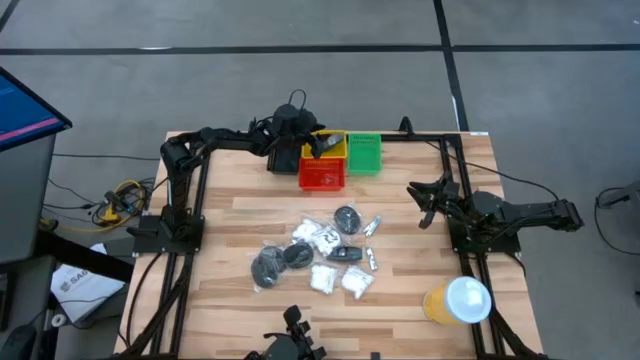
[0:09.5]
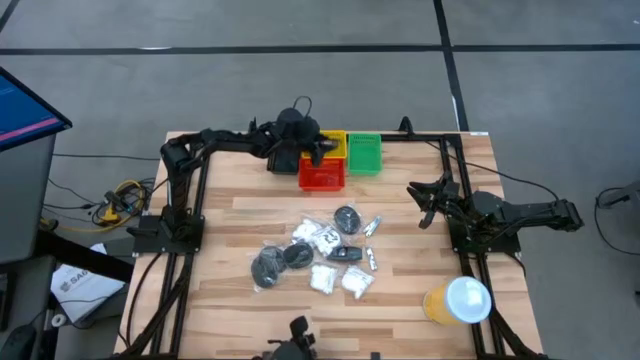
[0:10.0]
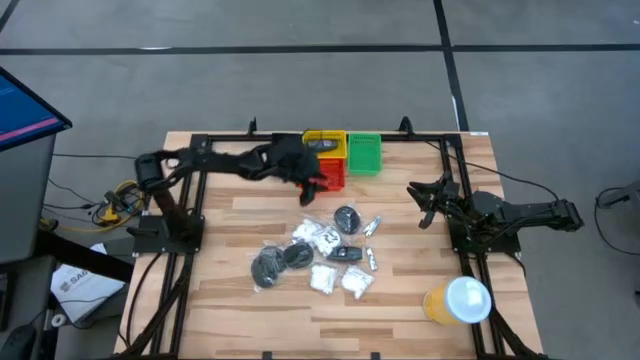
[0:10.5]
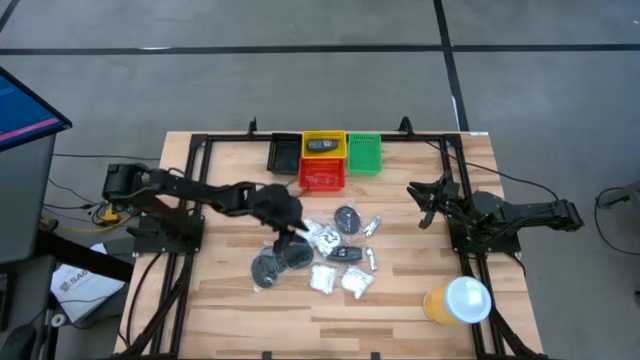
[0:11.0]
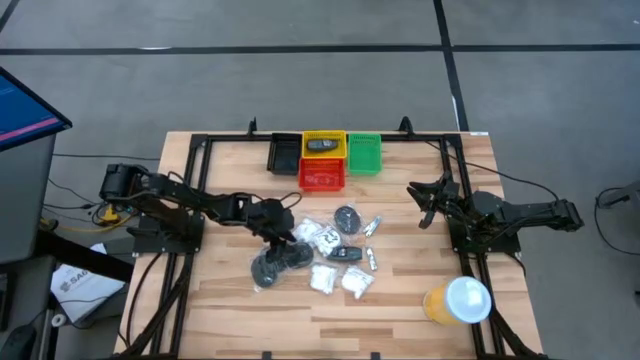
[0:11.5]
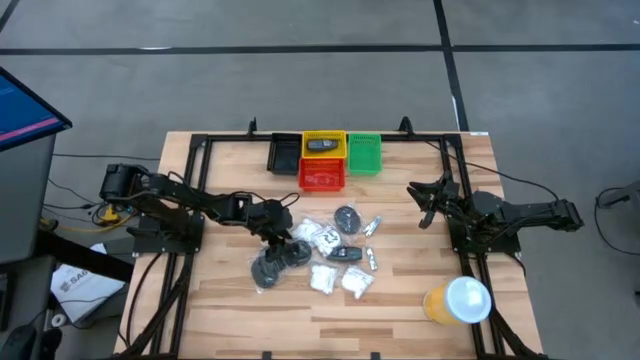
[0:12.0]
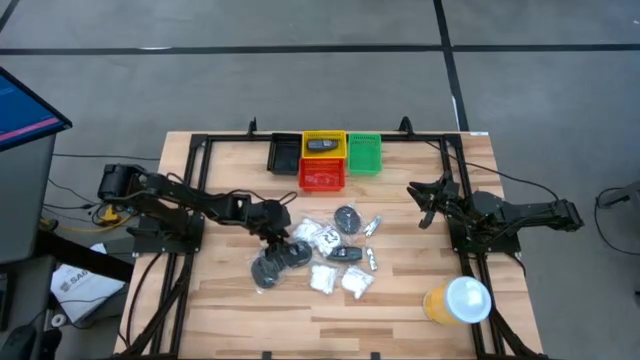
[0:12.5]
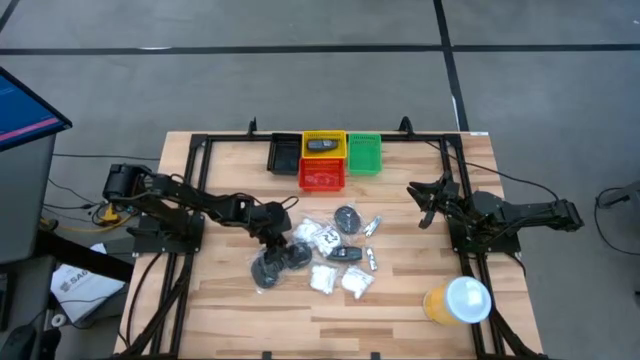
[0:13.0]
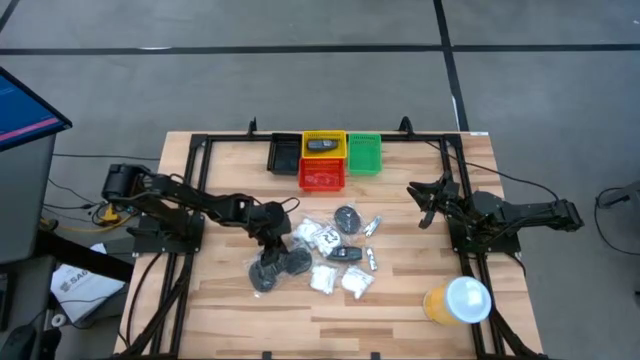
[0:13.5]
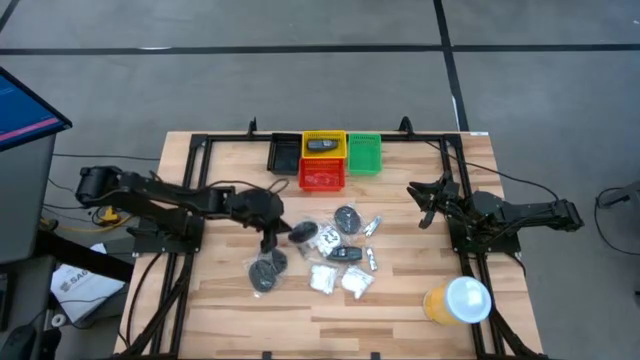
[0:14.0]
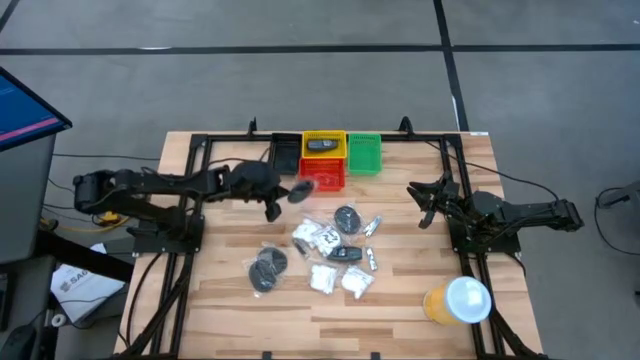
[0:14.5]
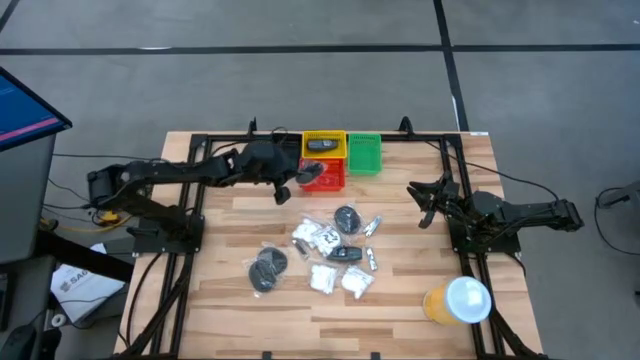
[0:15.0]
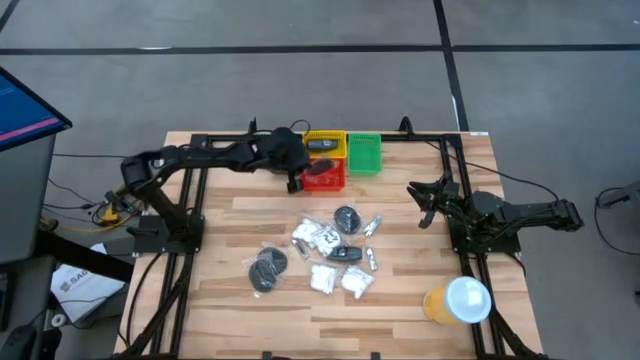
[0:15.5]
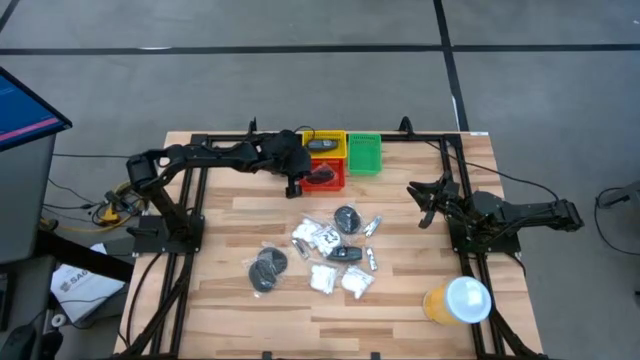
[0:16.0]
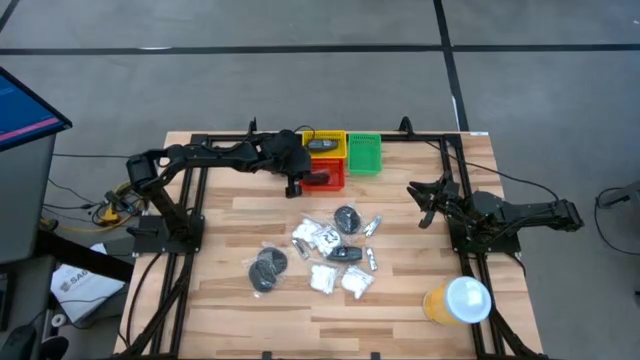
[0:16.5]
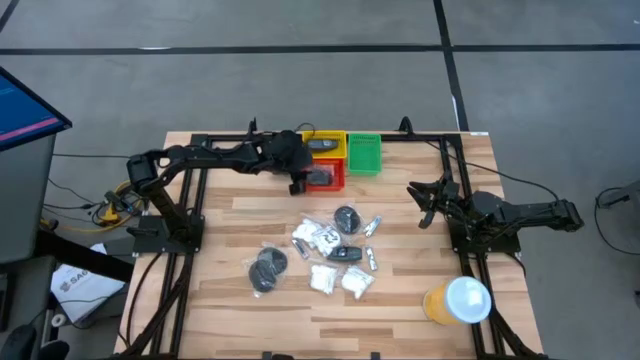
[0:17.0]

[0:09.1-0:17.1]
Task: Pick & Place Travel size toiletries
Put the black hairbrush into the red bin

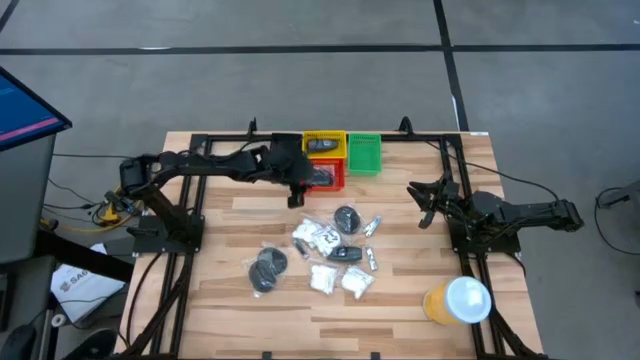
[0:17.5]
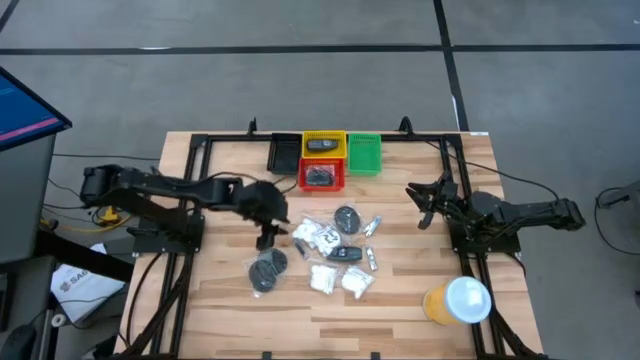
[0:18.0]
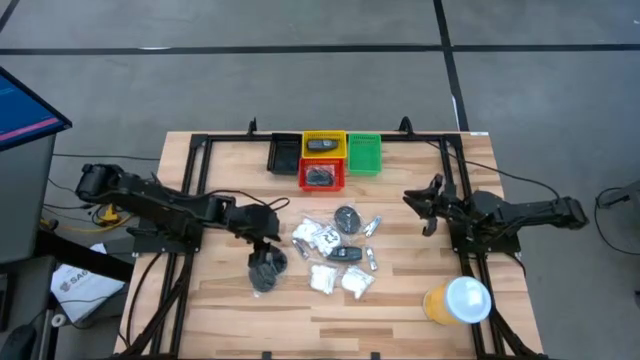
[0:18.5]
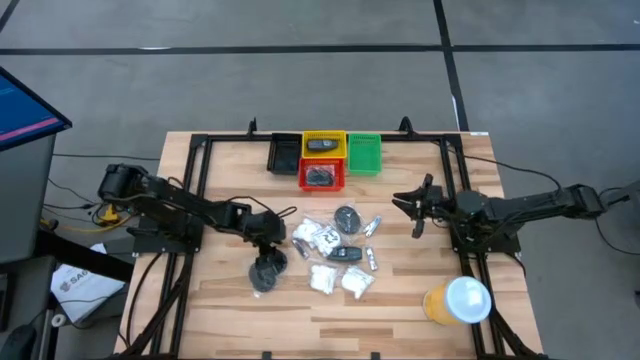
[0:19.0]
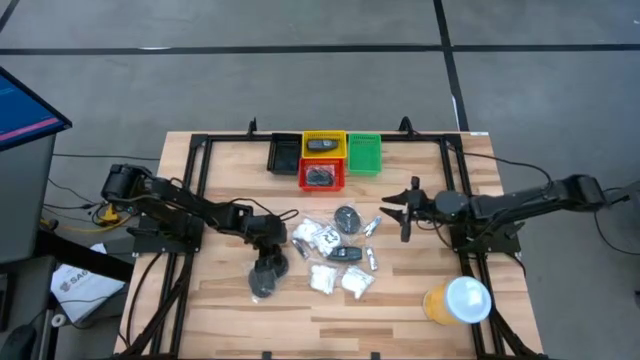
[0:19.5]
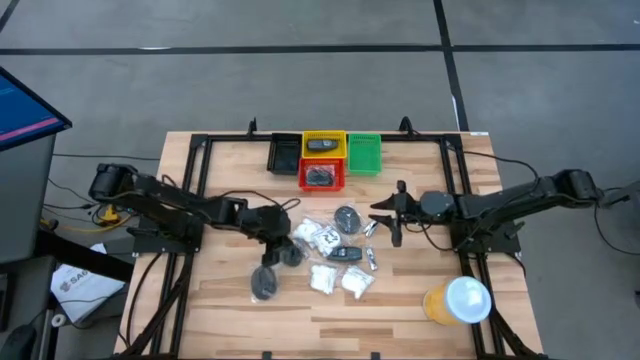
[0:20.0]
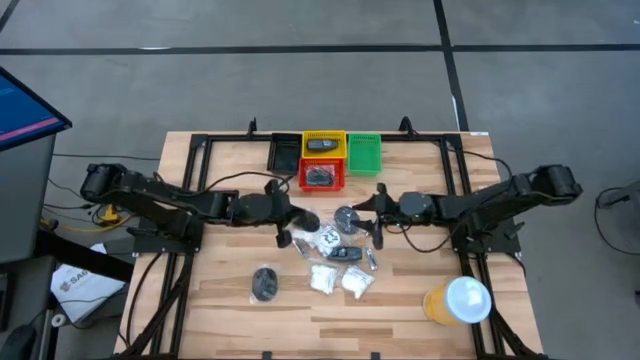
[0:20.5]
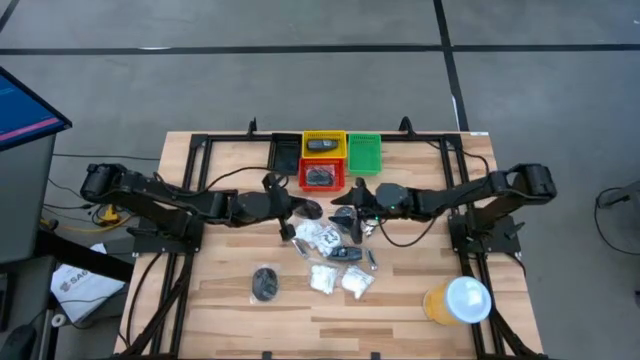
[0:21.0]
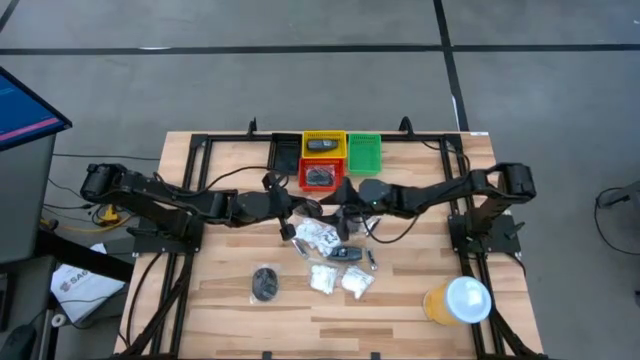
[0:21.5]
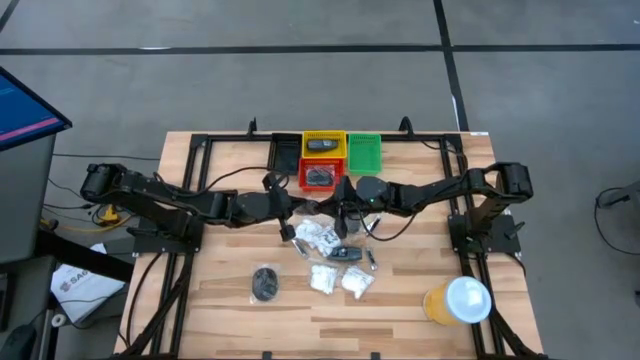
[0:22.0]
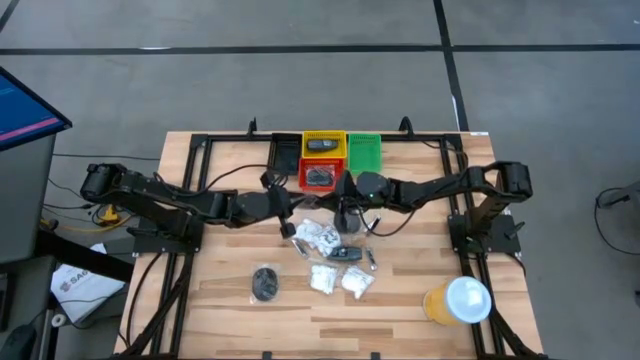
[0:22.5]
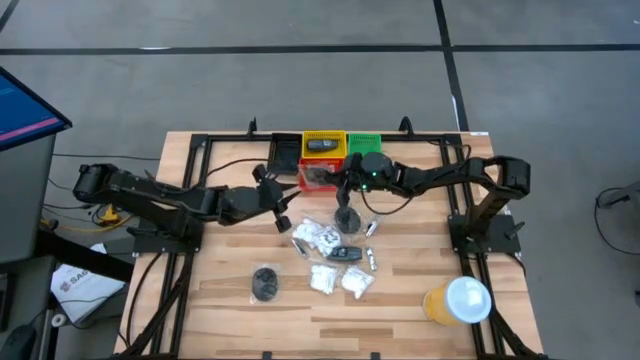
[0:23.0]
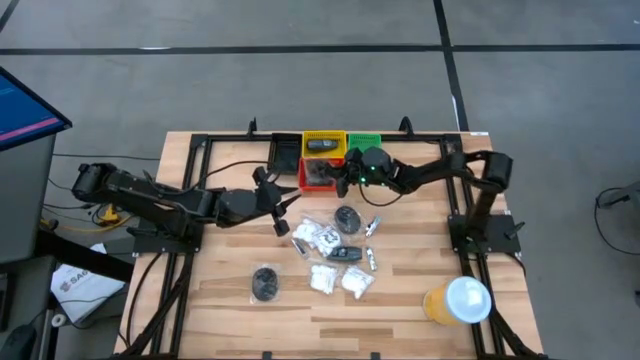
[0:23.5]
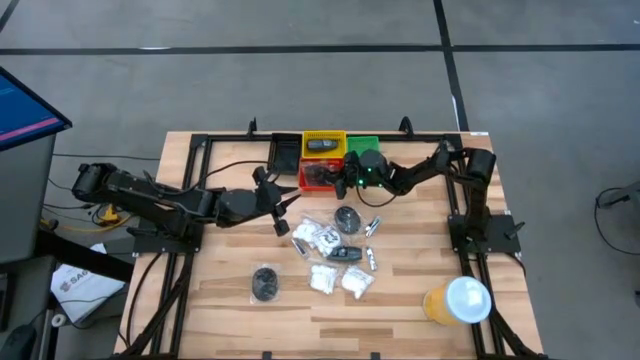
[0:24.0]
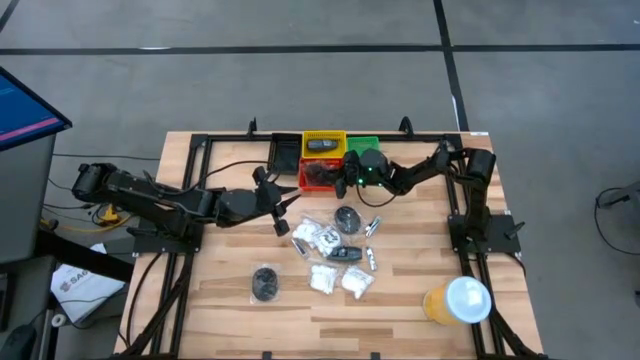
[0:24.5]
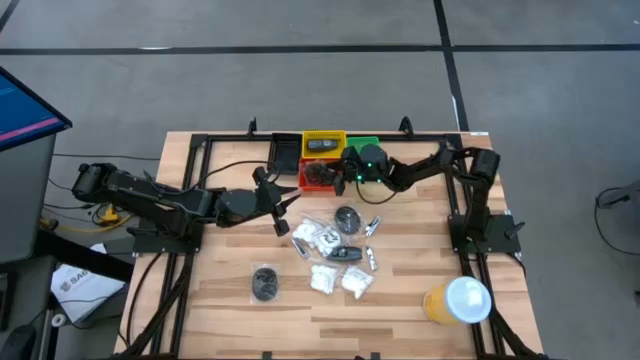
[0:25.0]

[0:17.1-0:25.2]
Put the black hairbrush into the red bin

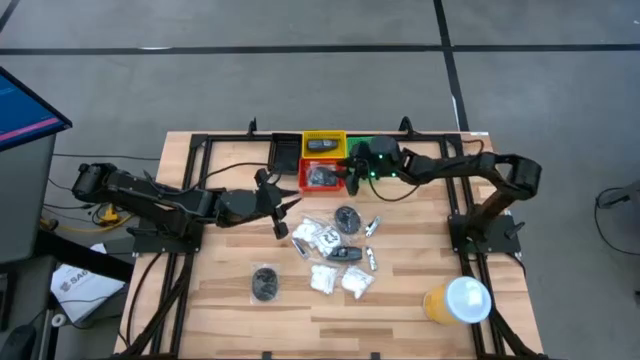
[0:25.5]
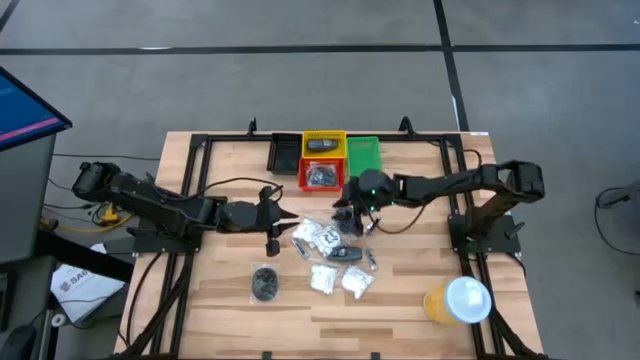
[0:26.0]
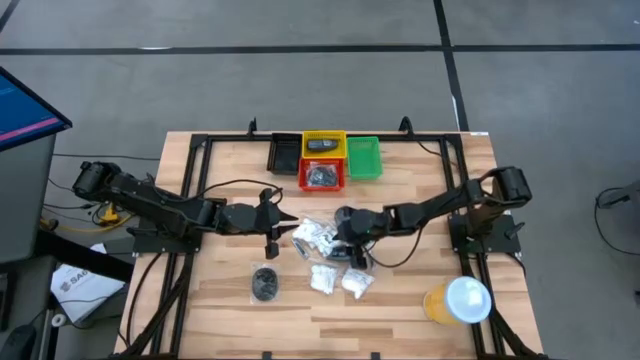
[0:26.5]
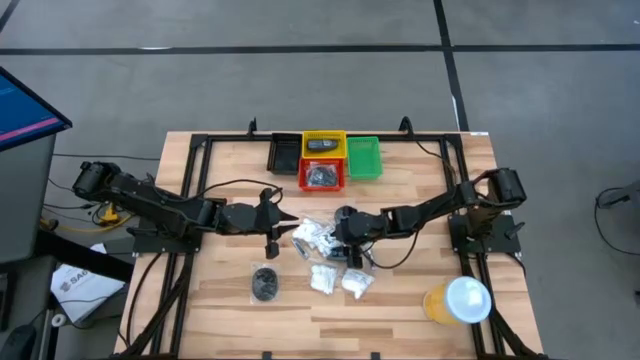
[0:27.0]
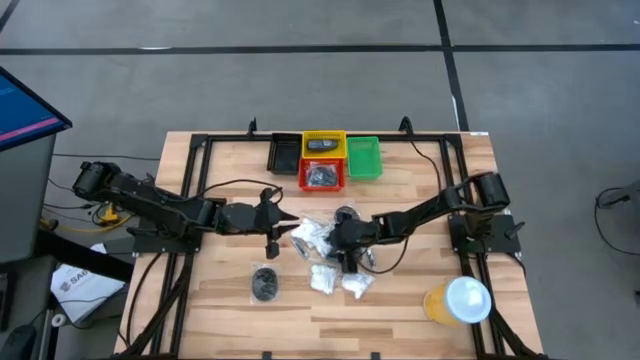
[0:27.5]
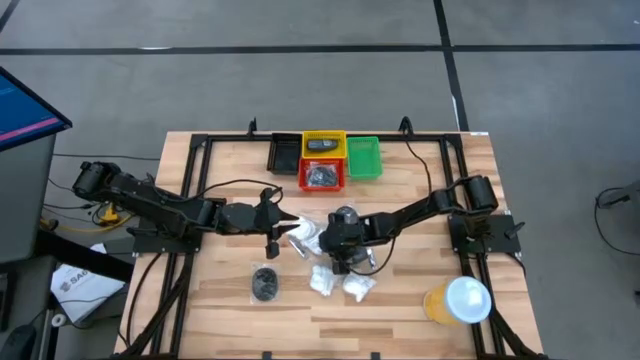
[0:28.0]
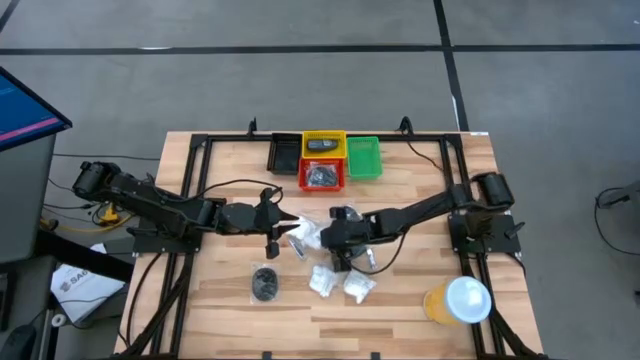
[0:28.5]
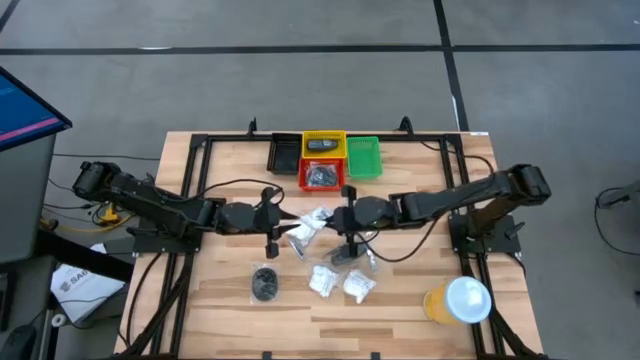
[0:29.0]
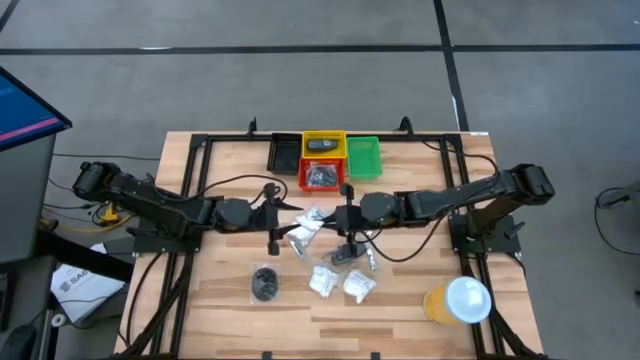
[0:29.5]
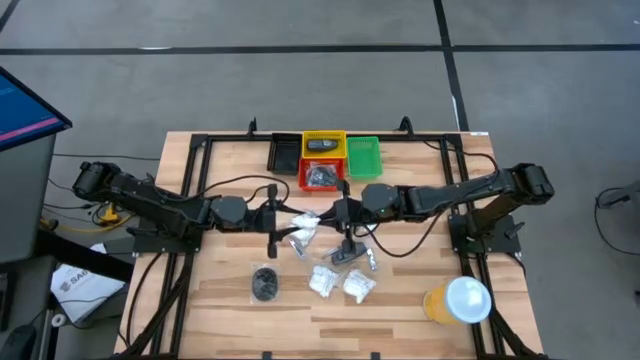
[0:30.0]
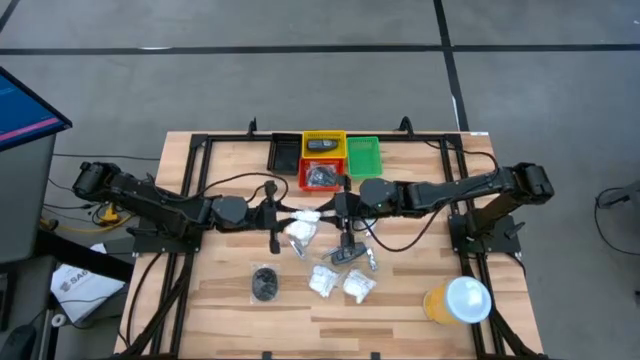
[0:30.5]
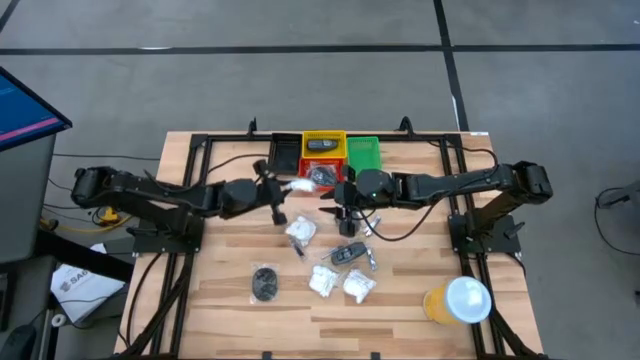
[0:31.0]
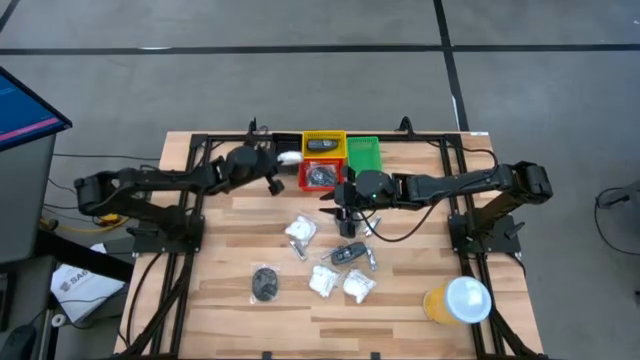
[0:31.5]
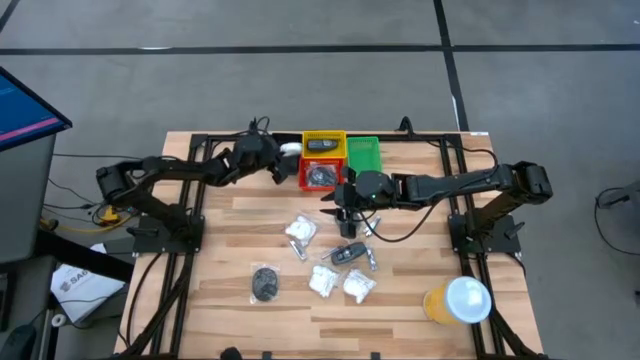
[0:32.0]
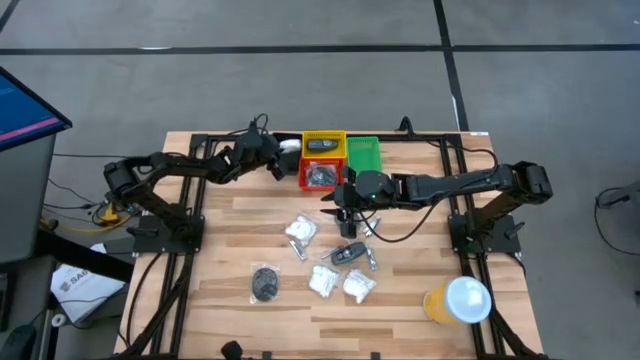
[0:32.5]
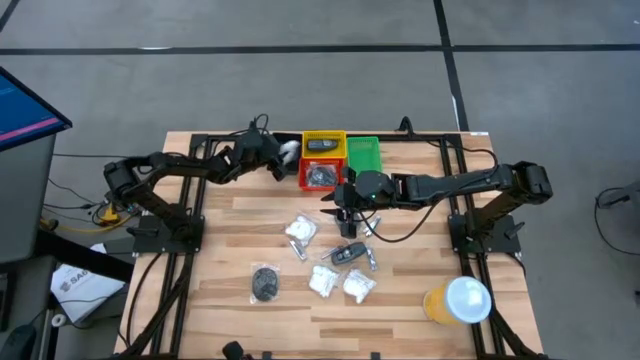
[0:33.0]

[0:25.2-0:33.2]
Put the cotton pack into the black bin
